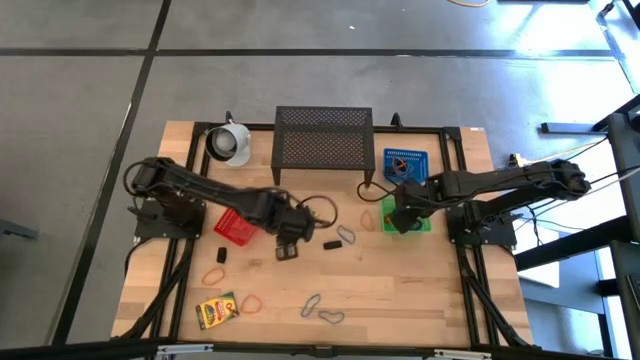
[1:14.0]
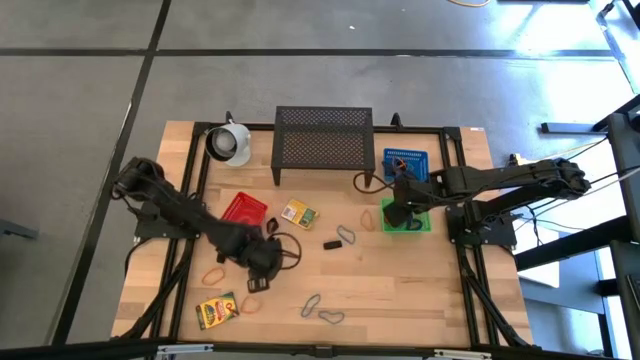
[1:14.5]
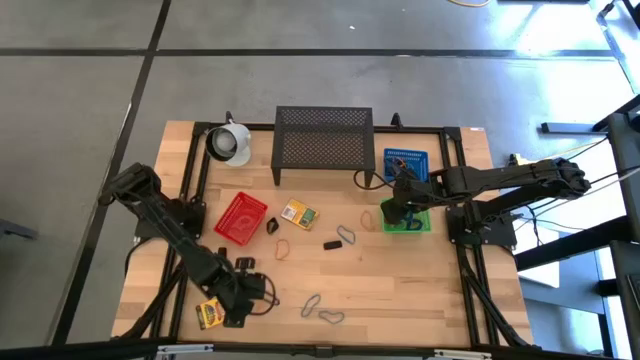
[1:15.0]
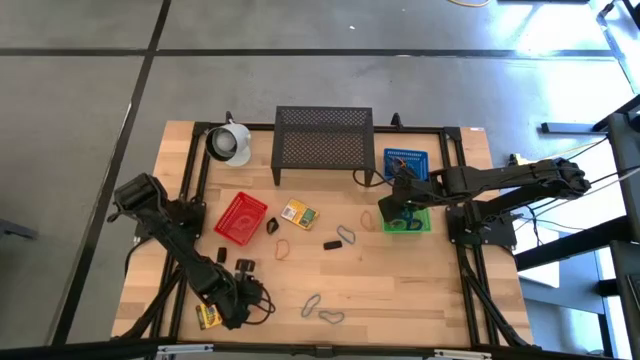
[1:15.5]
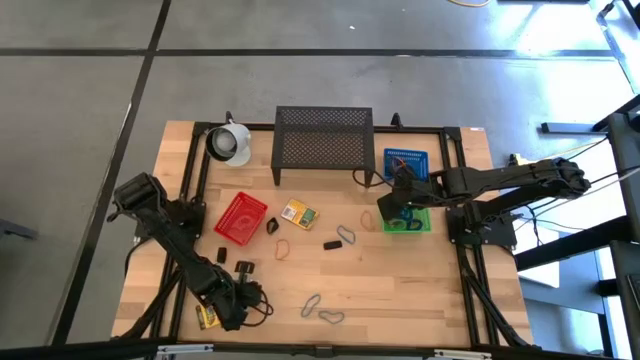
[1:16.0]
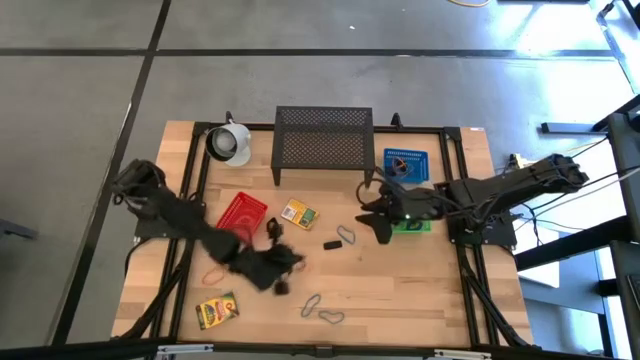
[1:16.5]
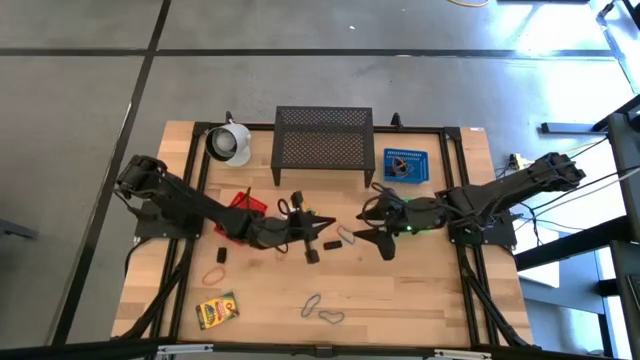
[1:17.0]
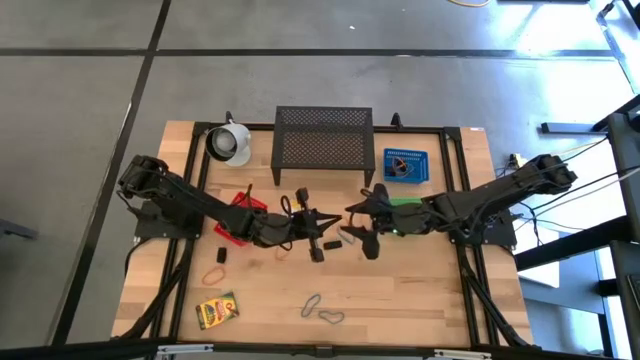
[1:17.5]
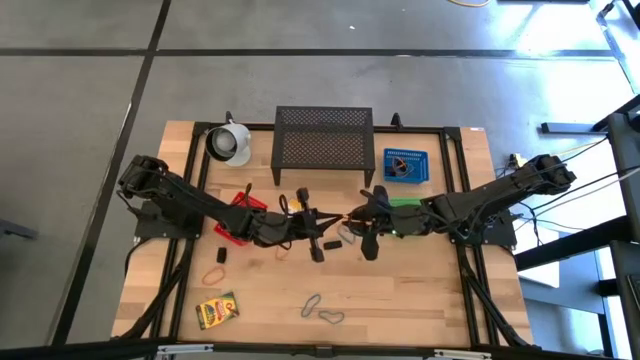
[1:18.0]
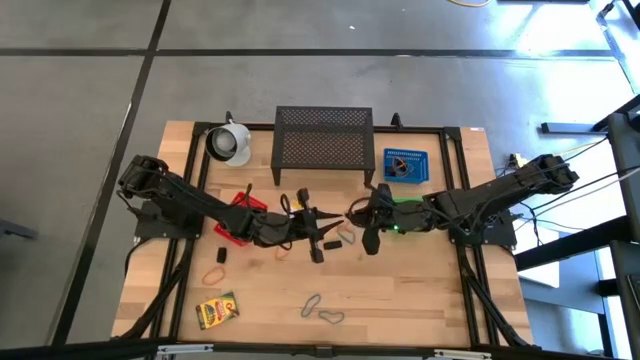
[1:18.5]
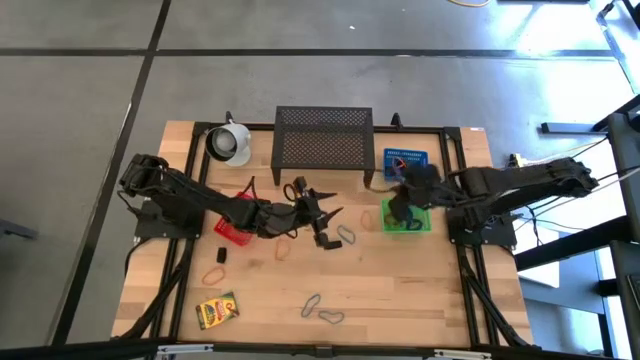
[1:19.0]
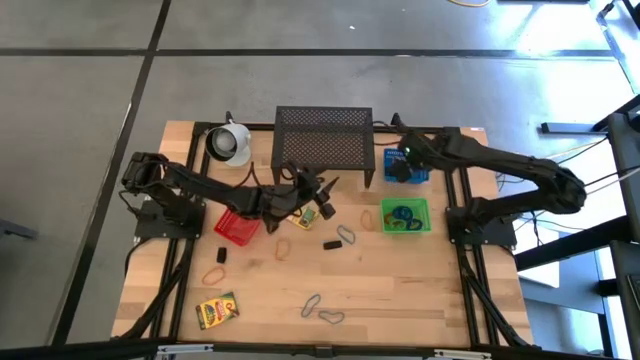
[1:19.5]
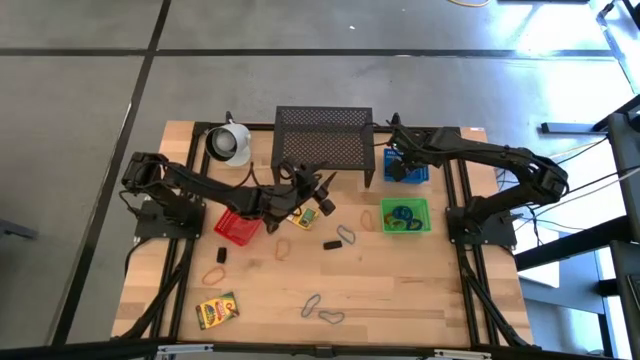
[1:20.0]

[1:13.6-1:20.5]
Task: Pick & Place Office Desk Supplies
Put the orange rubber band into the blue bin

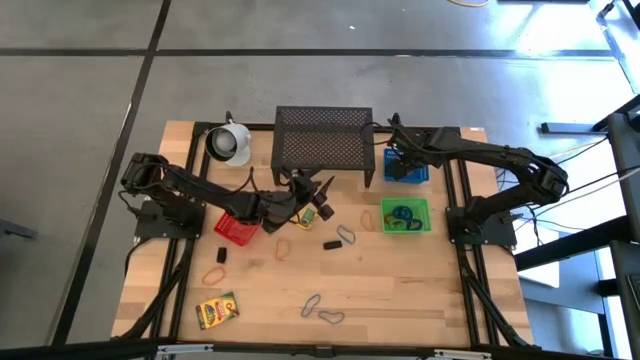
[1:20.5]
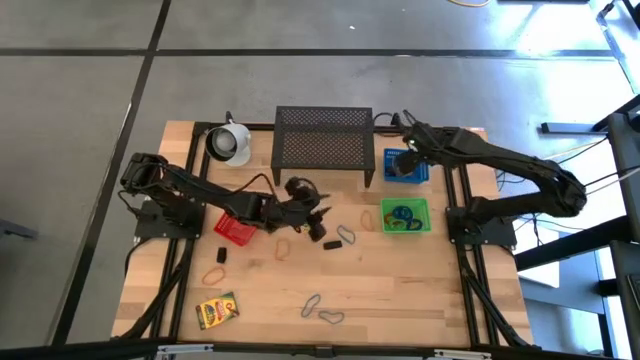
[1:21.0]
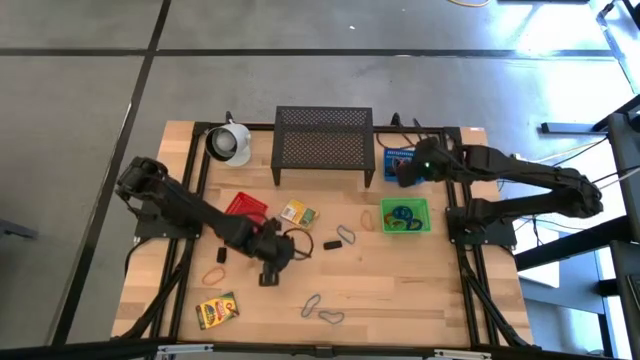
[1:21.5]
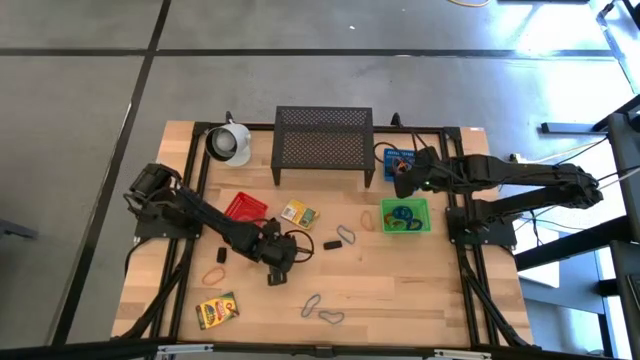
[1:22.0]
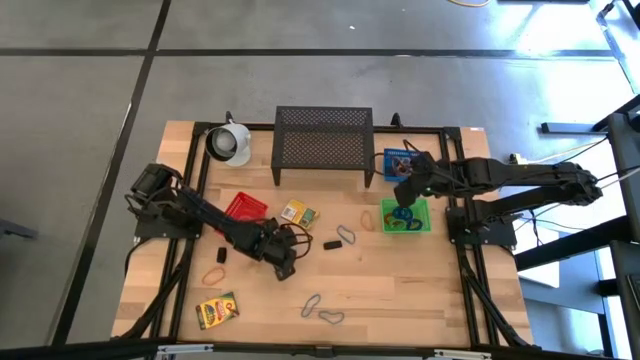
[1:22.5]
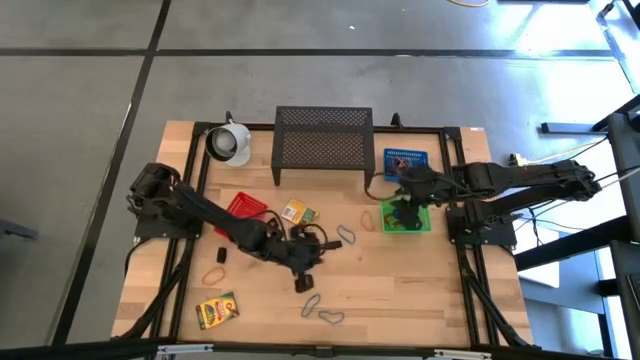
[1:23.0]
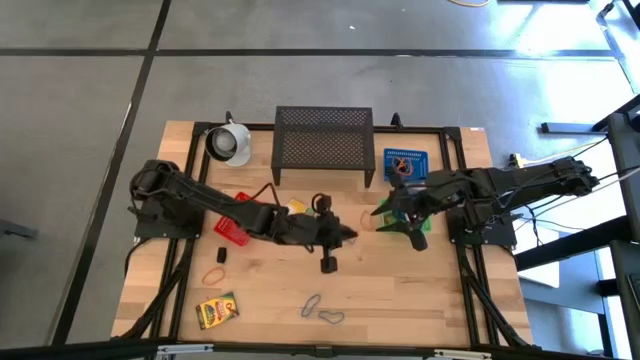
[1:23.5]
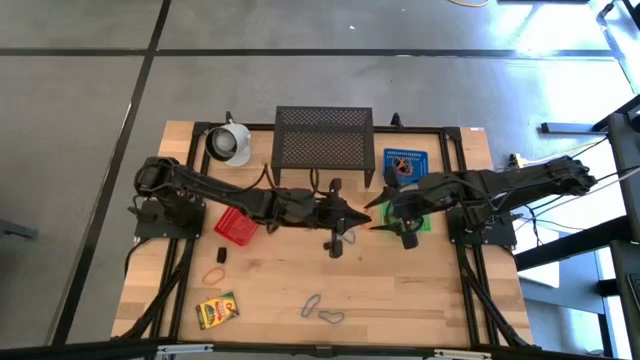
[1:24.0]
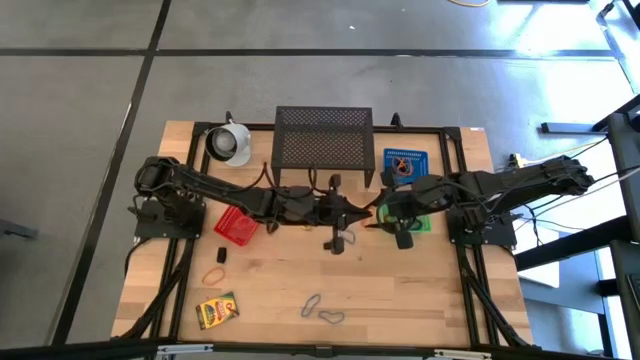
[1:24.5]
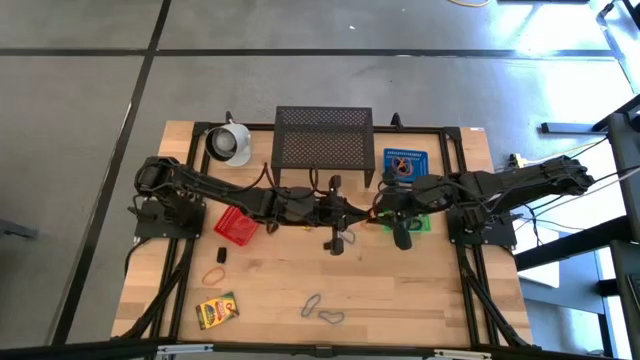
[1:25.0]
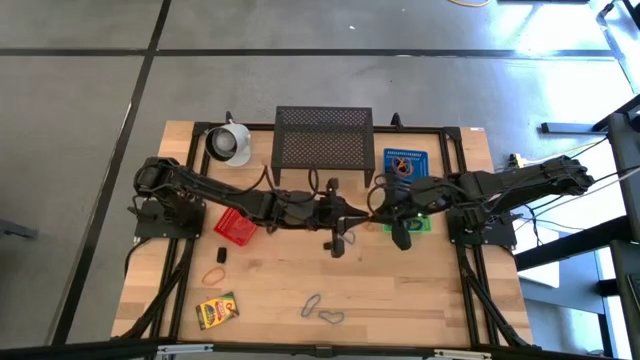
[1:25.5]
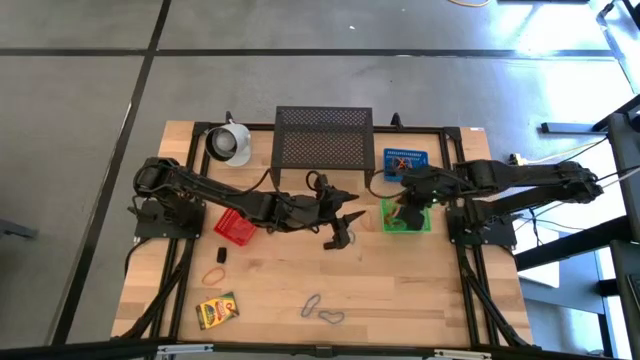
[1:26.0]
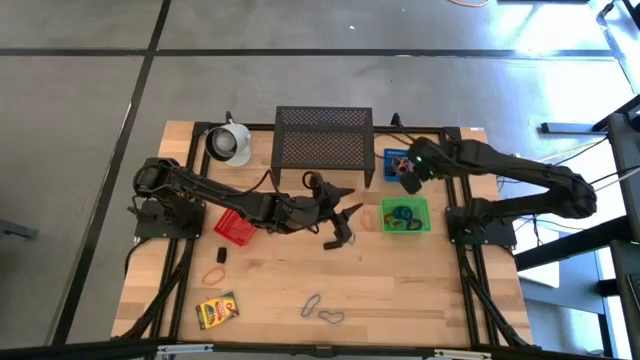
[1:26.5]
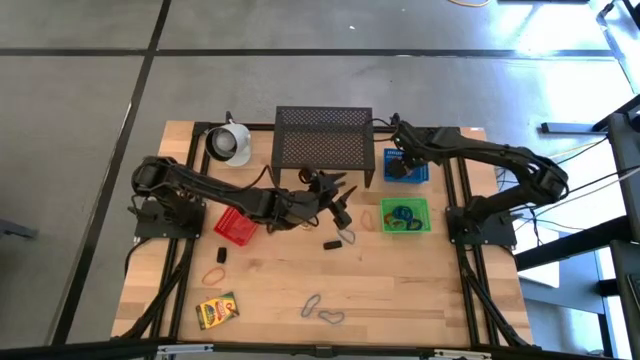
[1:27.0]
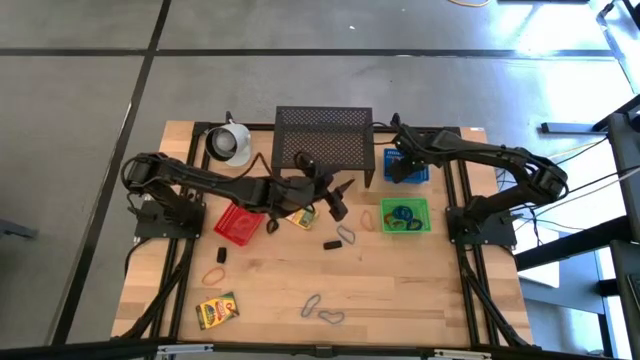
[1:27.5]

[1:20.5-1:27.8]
Put the orange rubber band into the blue bin

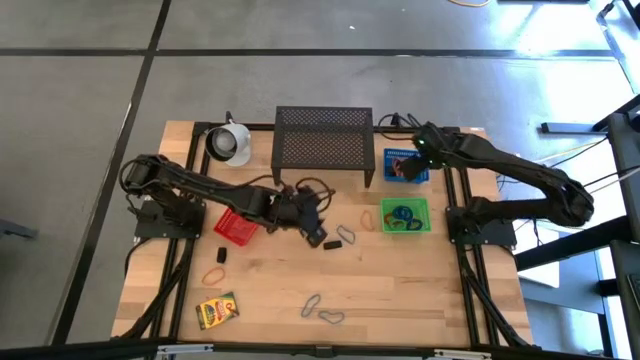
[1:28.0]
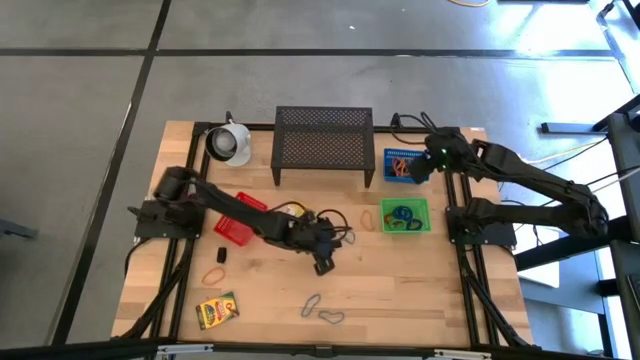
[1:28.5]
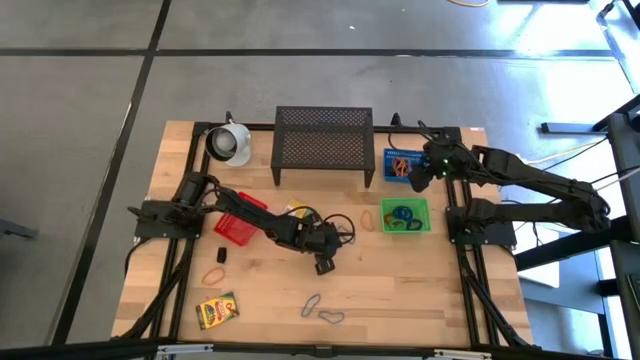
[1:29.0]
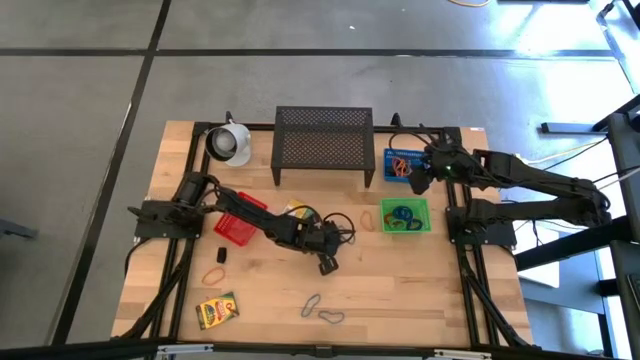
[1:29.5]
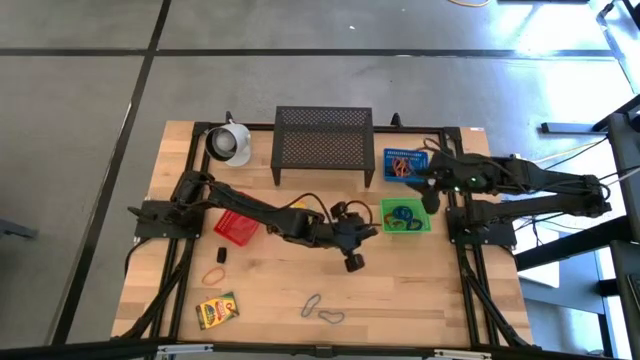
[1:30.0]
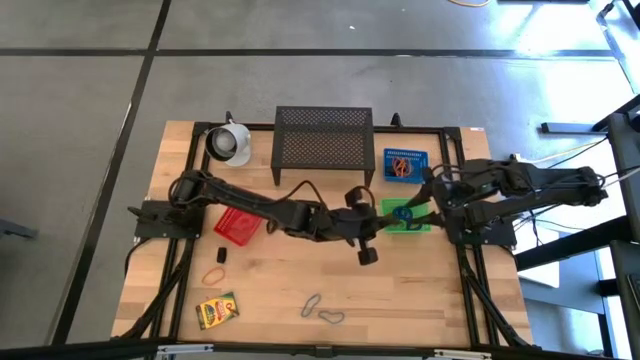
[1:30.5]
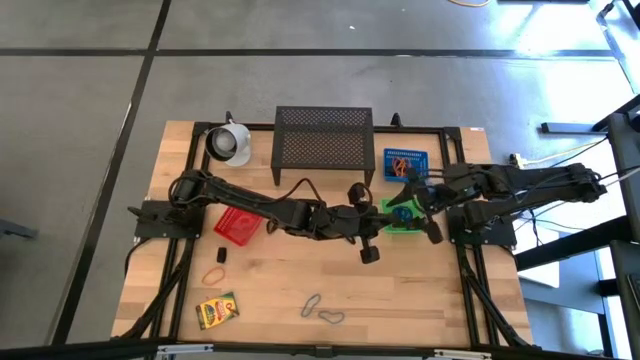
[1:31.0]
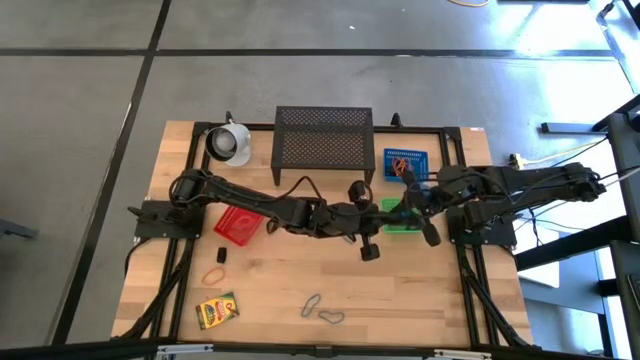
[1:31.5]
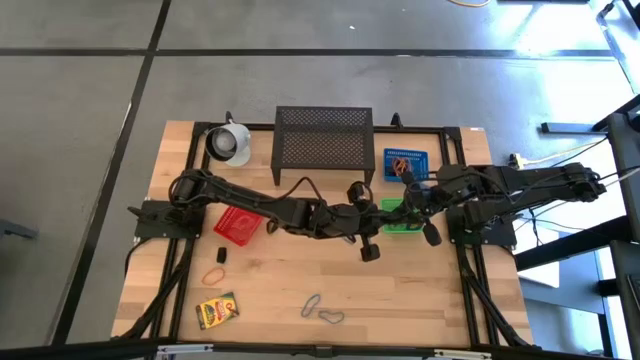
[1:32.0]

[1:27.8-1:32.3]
Put the black rubber band into the blue bin

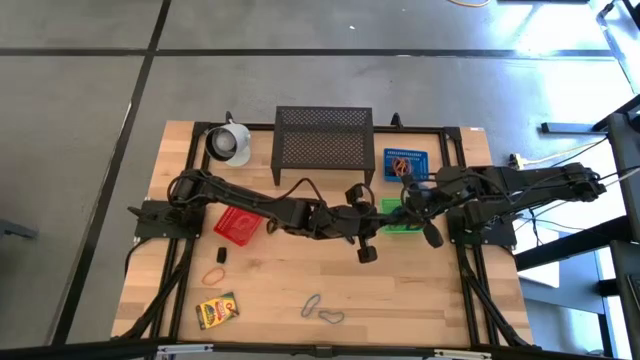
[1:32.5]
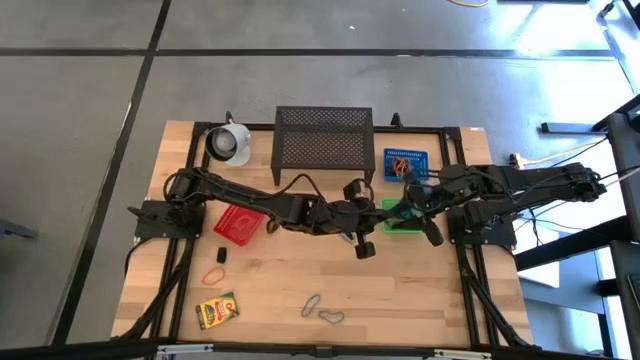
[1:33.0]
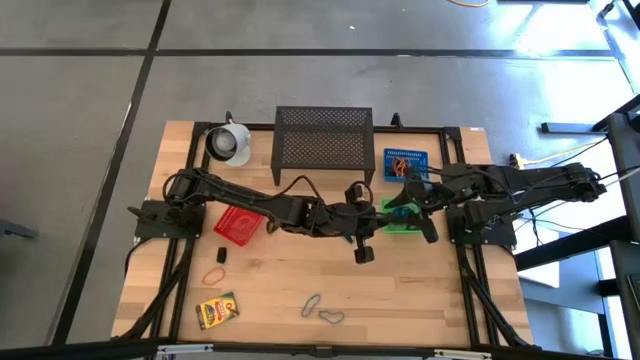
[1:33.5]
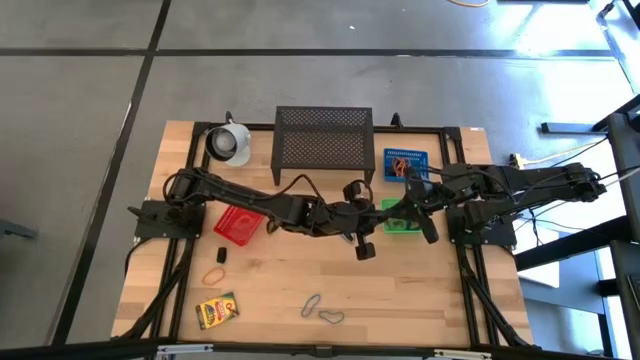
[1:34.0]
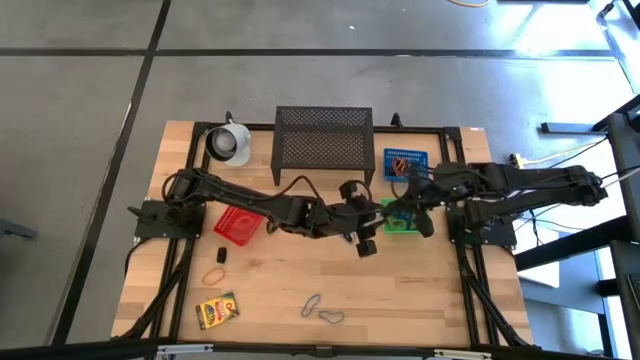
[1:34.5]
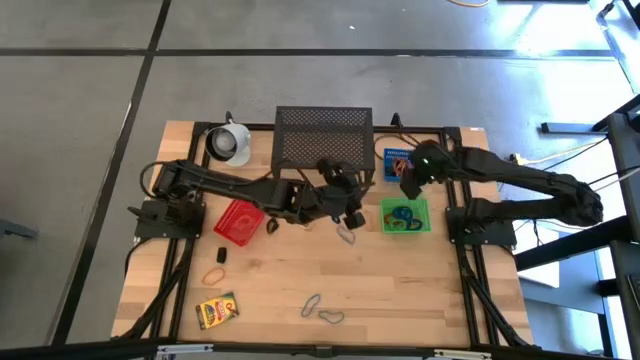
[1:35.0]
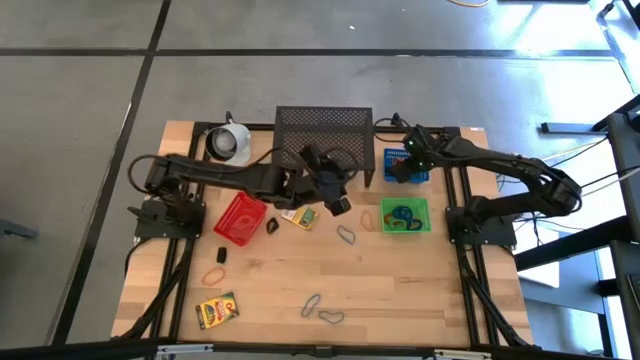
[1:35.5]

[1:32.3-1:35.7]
Put the black rubber band into the blue bin
